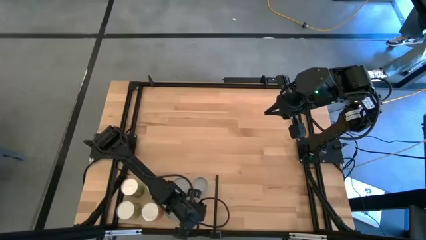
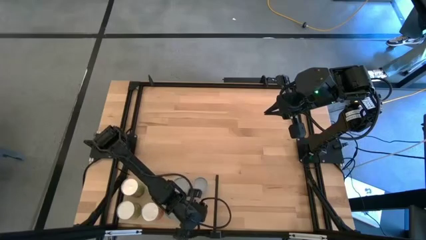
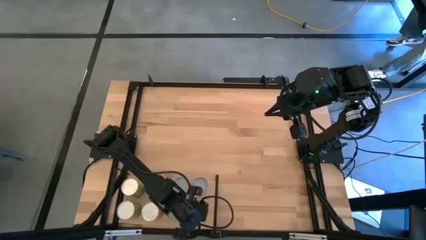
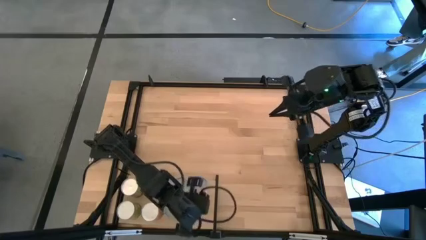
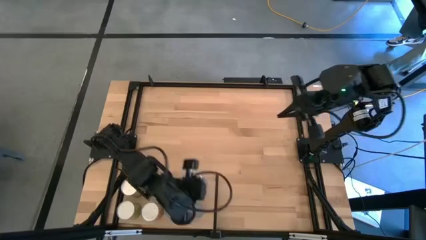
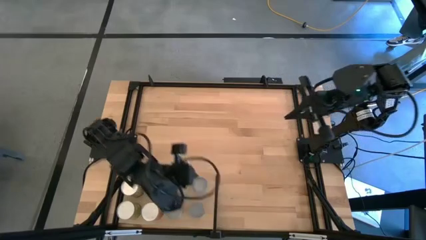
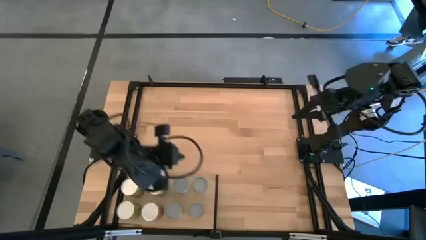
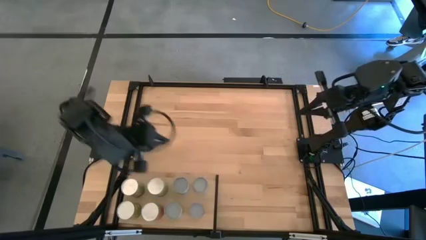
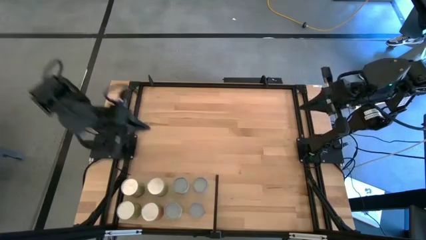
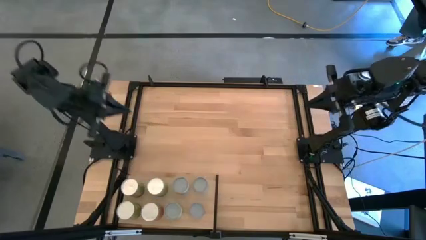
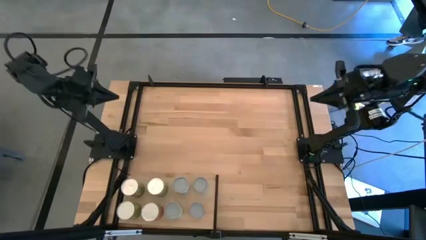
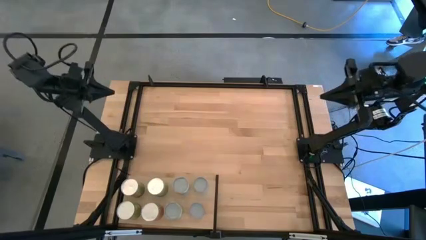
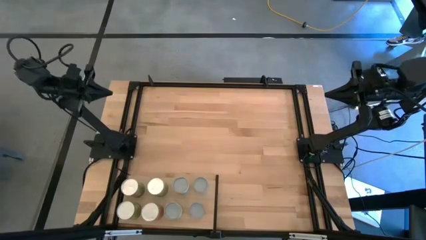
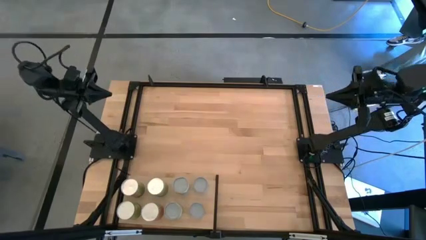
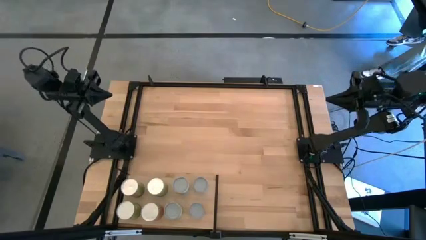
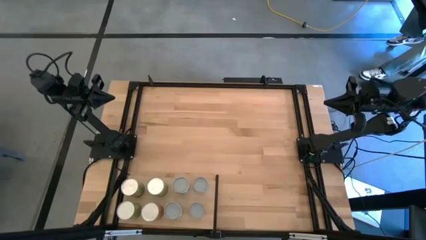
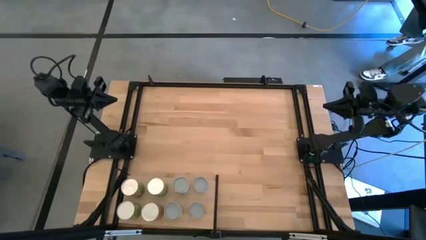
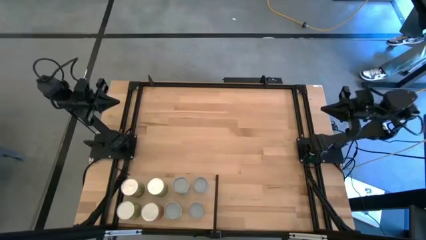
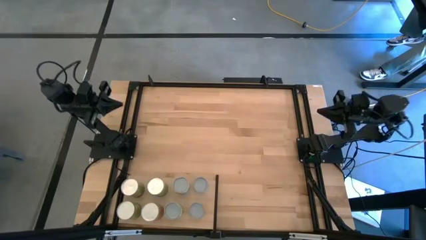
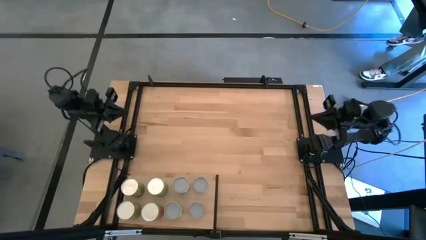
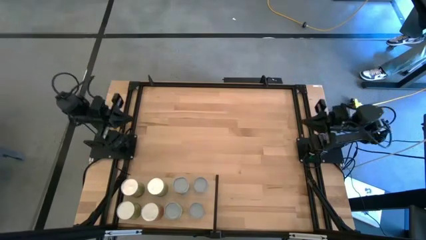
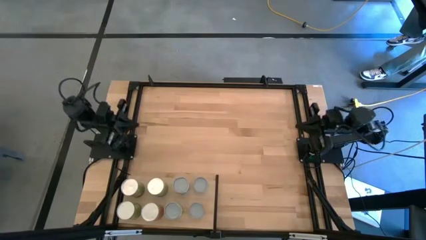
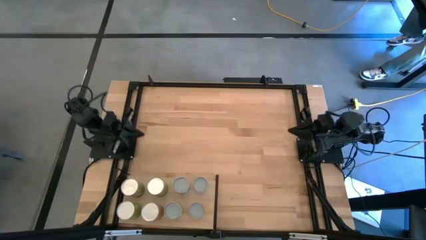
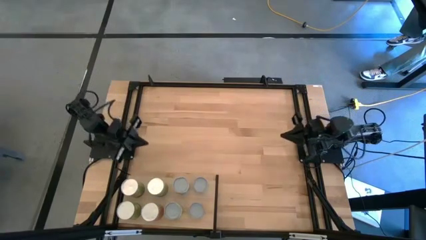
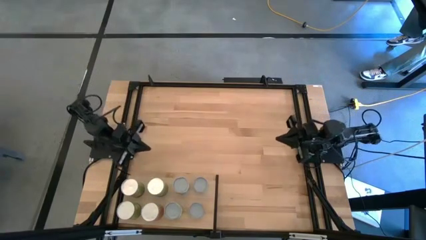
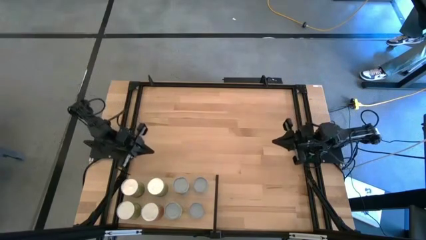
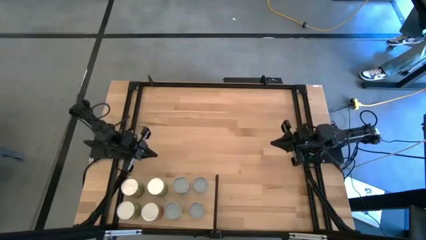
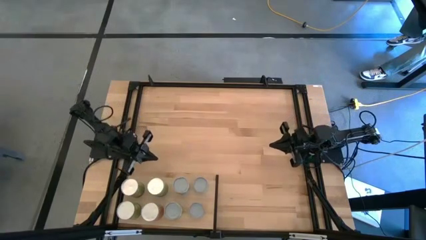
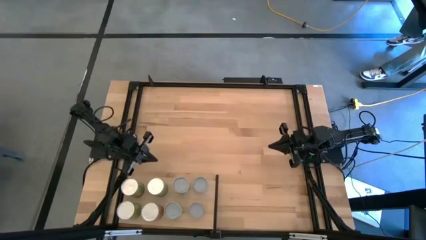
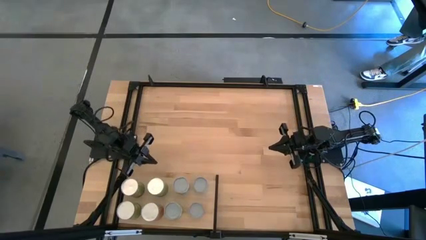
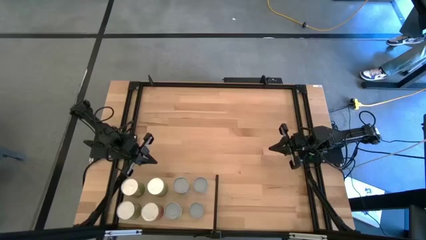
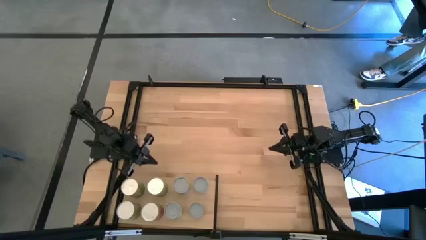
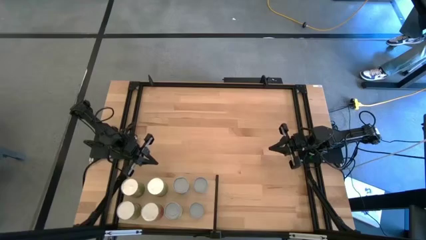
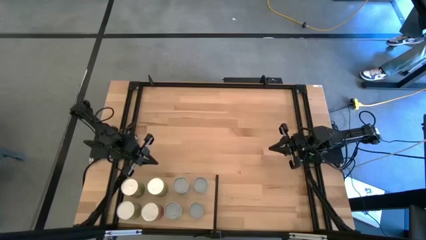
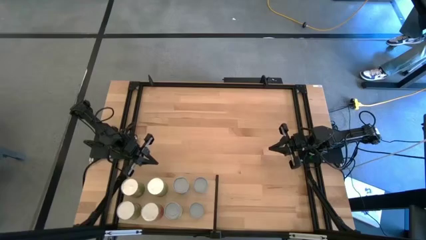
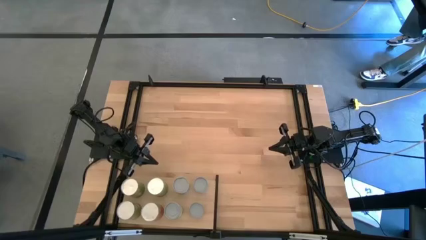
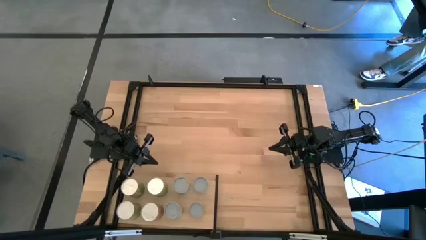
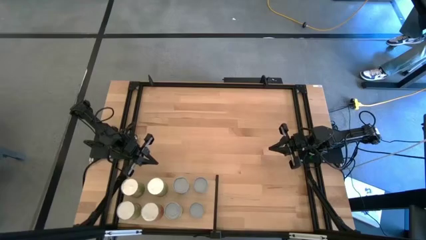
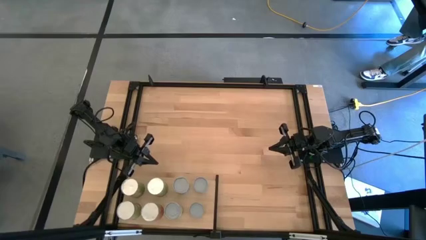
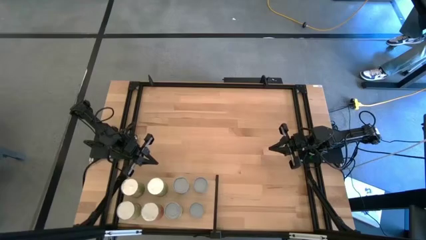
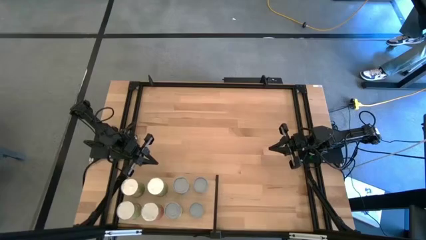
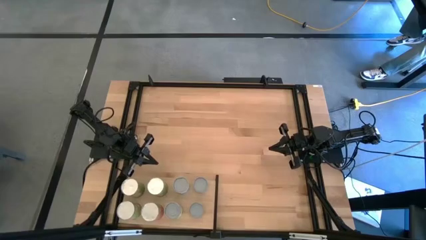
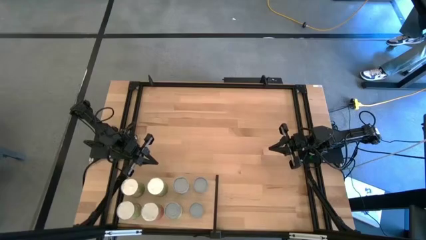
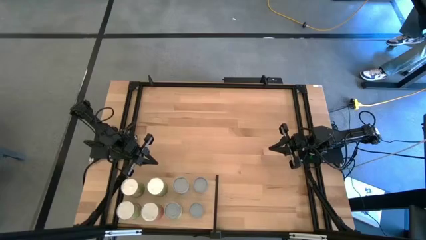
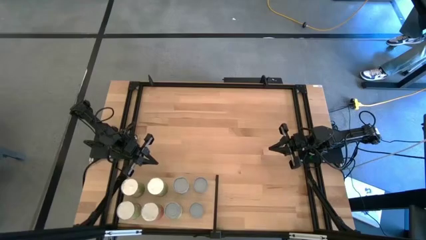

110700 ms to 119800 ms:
Task: Pick and place cans onto a shelf
Return to Home Position

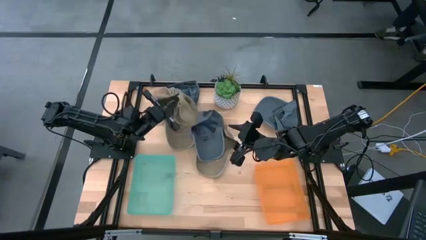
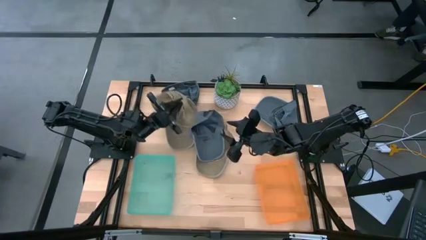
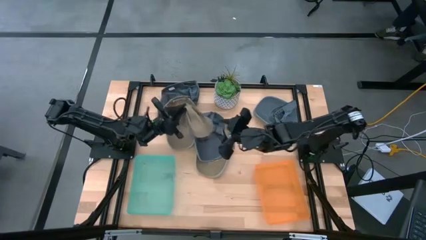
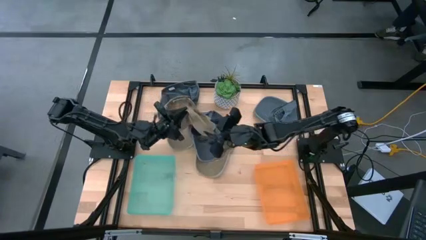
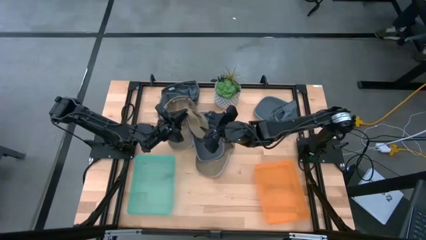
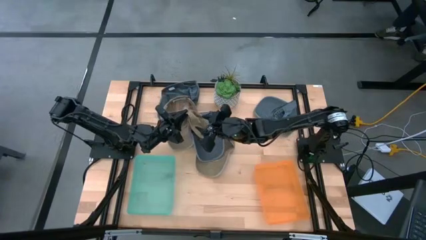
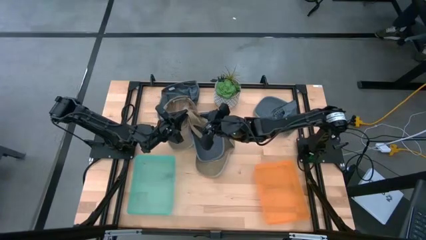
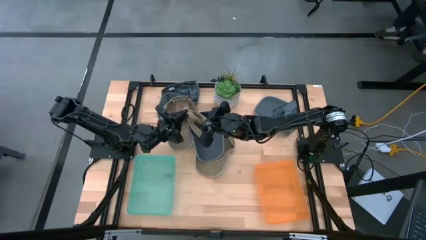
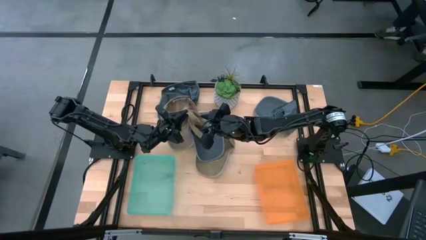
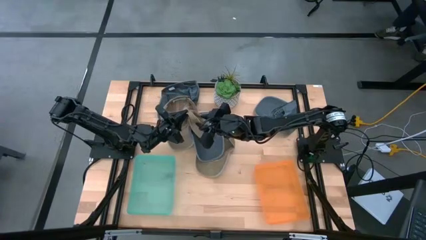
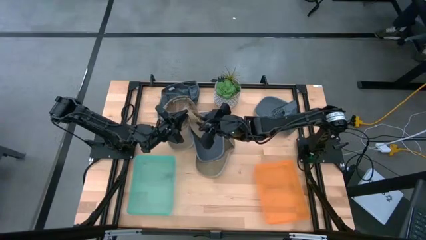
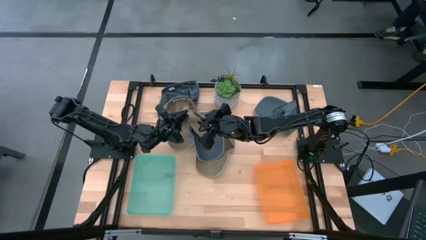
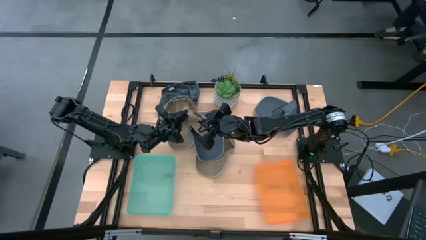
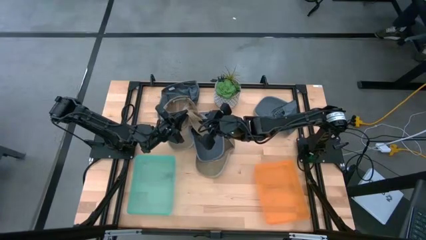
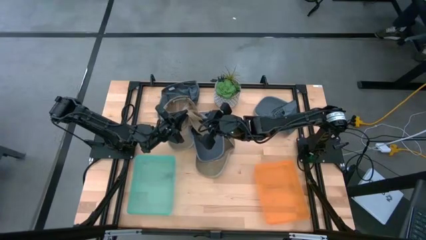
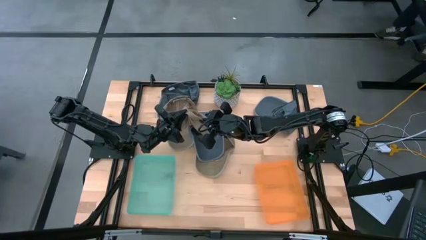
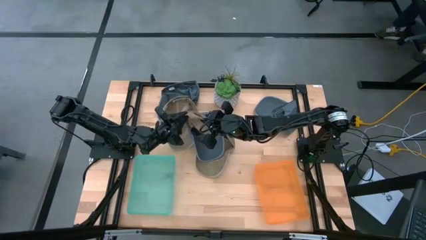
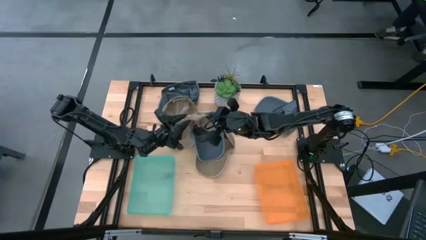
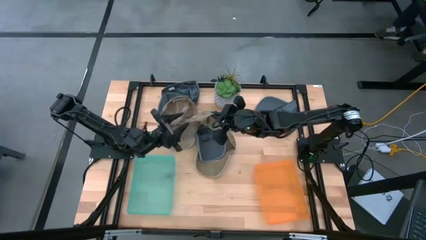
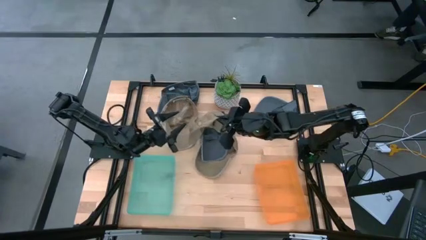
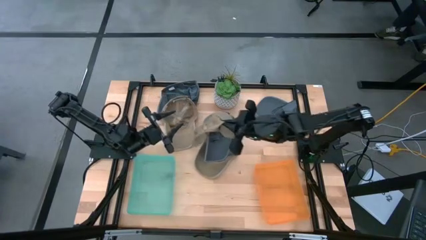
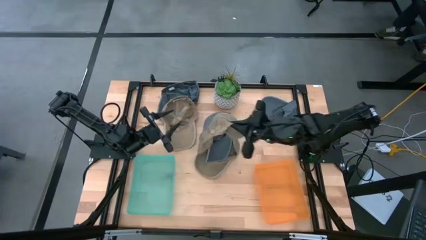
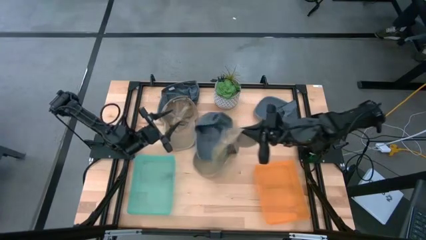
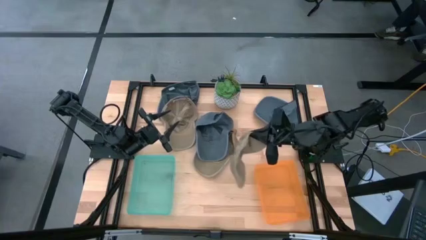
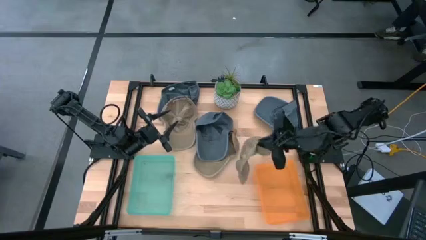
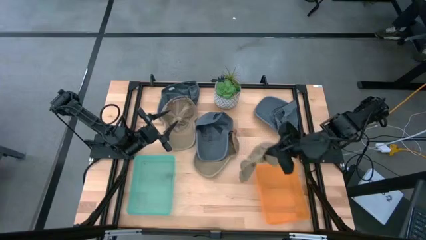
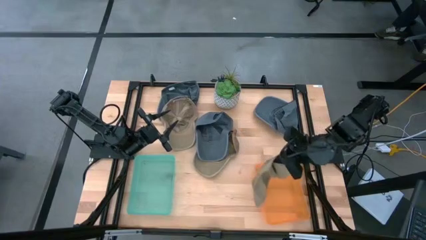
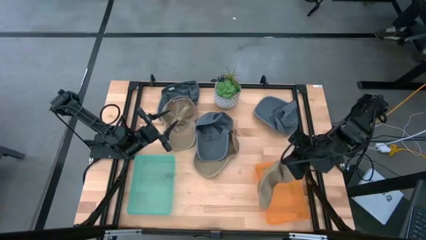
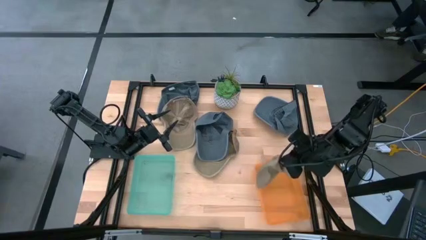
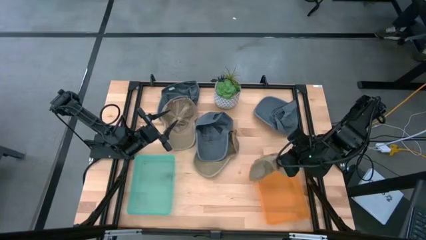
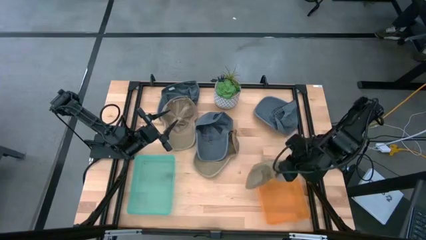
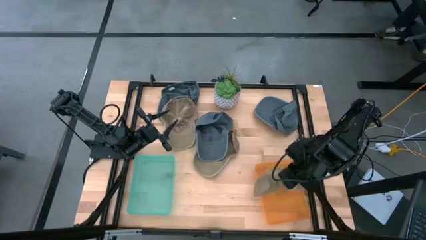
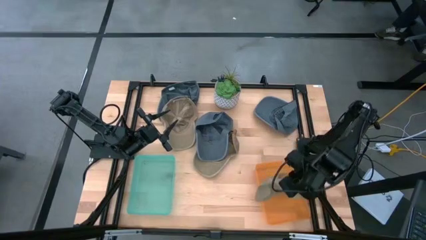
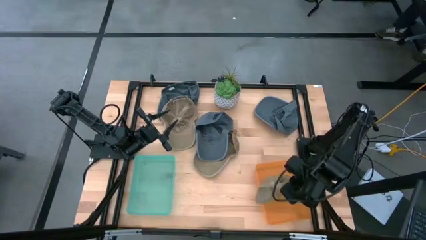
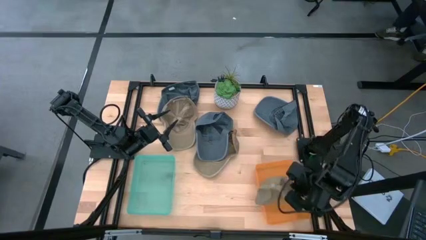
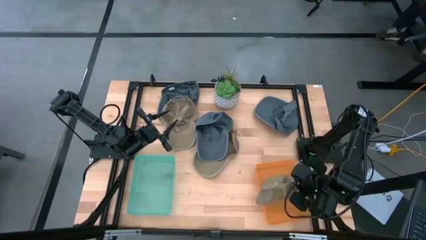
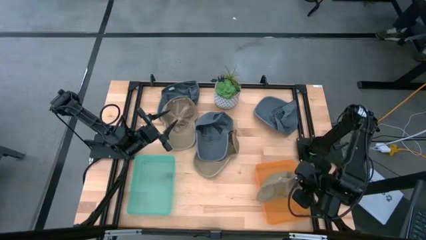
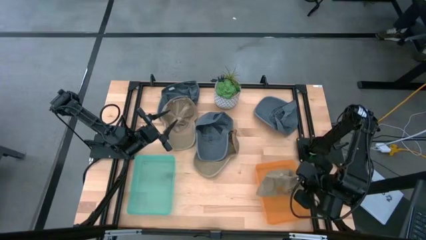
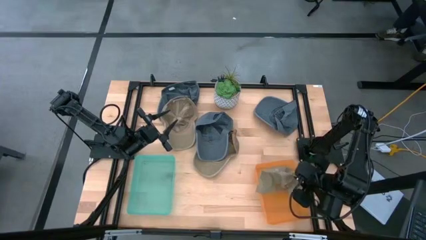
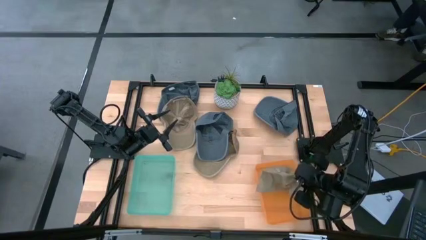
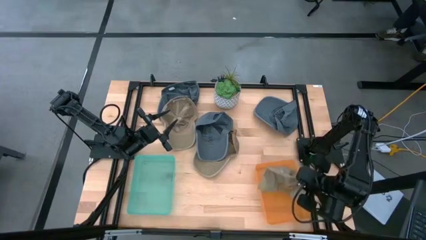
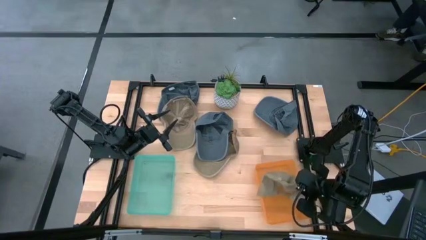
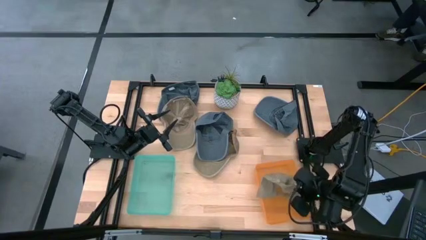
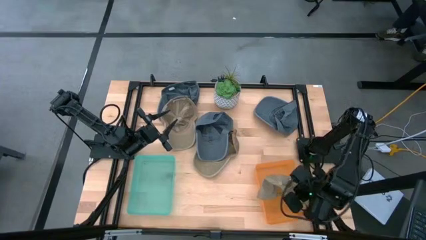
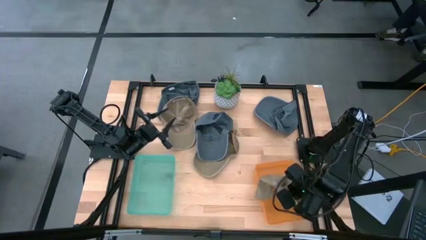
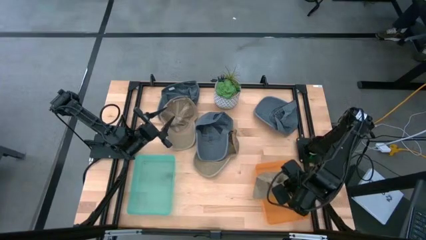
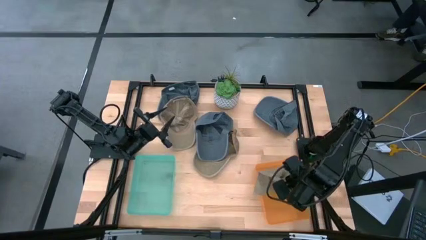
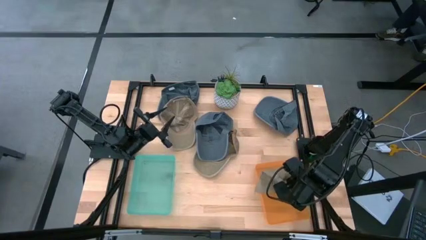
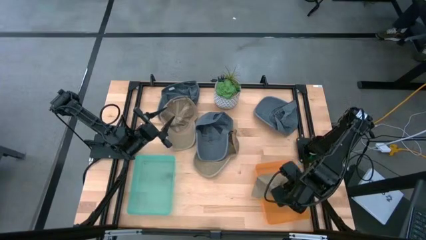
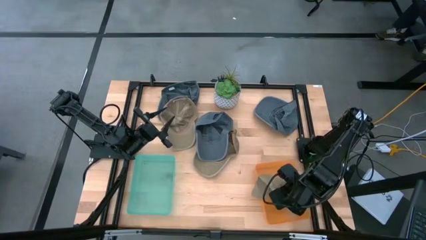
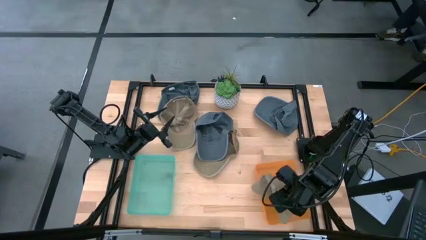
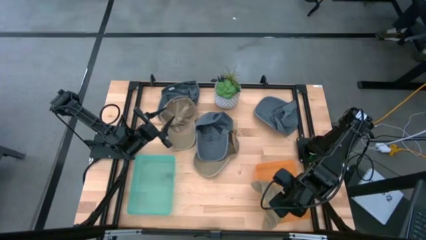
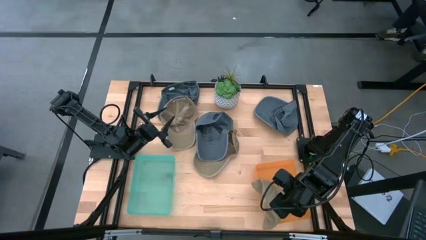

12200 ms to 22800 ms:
Task: Pick & Place hat
Put the top right brown cap into the orange bin
